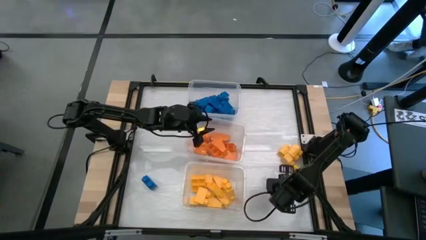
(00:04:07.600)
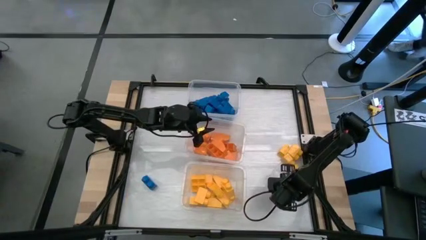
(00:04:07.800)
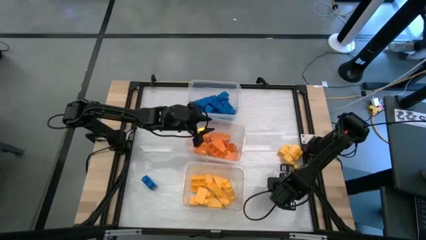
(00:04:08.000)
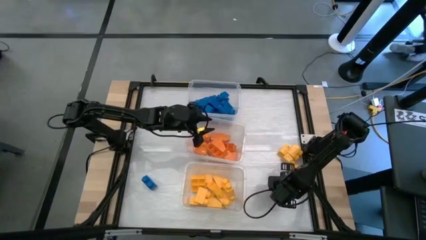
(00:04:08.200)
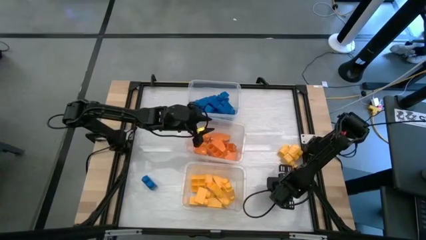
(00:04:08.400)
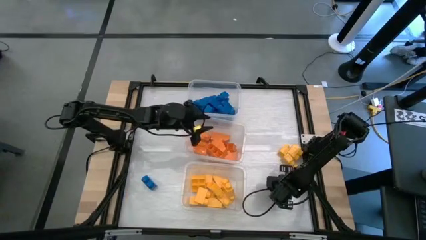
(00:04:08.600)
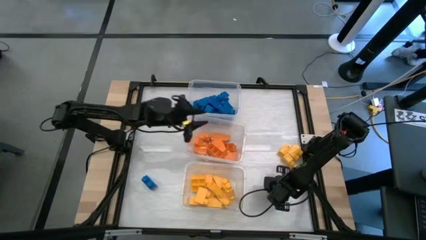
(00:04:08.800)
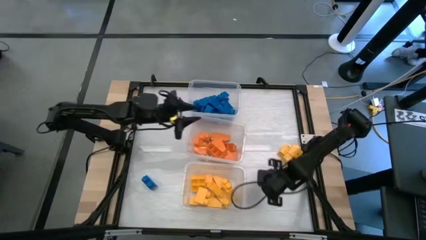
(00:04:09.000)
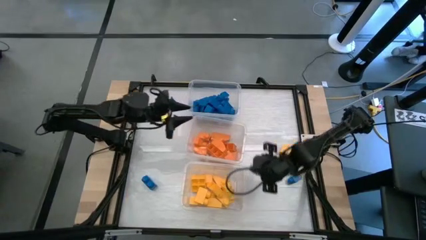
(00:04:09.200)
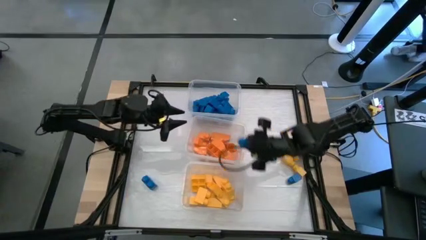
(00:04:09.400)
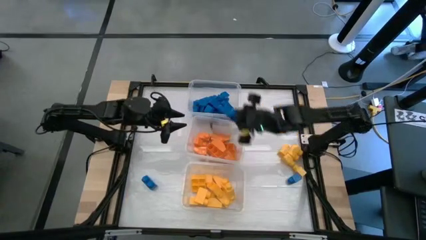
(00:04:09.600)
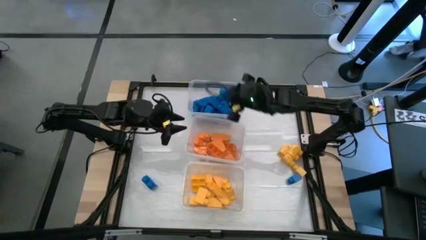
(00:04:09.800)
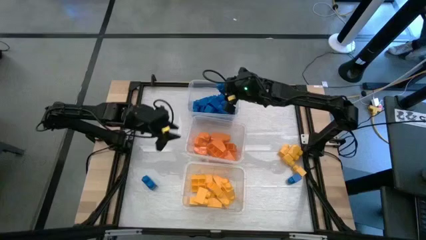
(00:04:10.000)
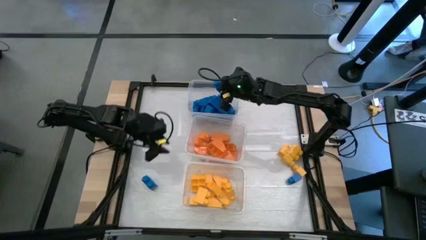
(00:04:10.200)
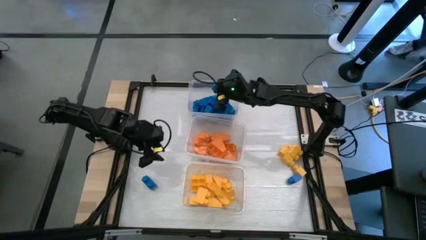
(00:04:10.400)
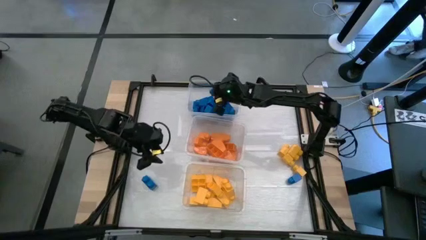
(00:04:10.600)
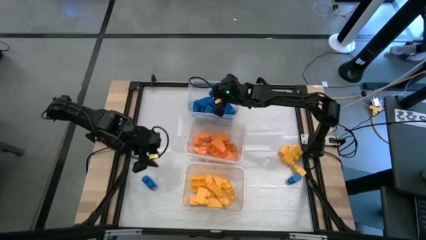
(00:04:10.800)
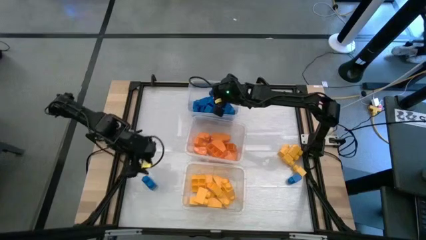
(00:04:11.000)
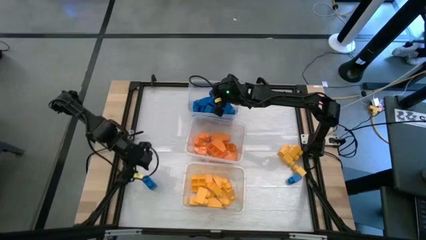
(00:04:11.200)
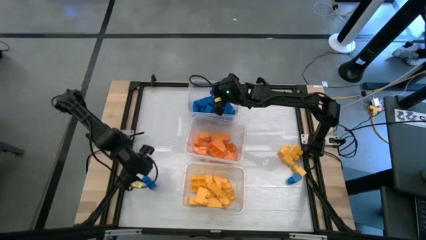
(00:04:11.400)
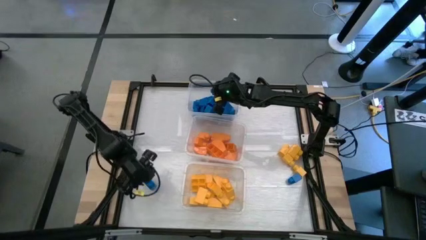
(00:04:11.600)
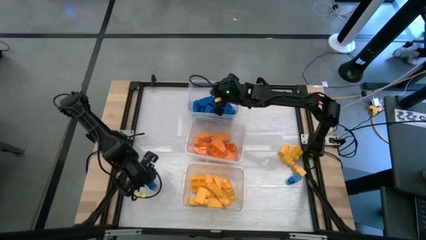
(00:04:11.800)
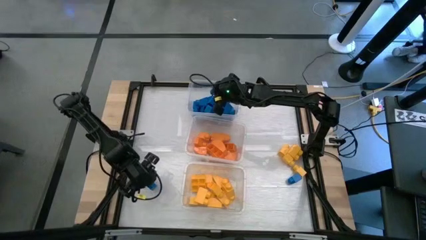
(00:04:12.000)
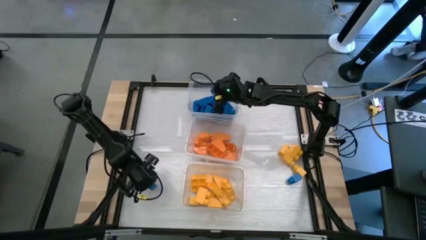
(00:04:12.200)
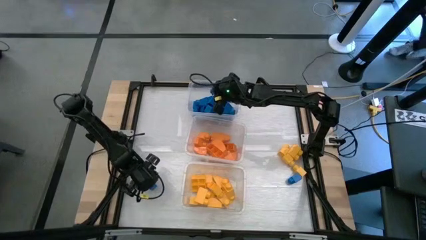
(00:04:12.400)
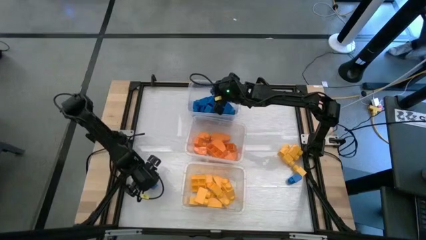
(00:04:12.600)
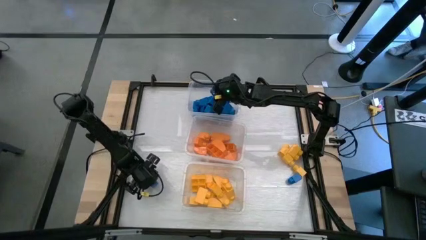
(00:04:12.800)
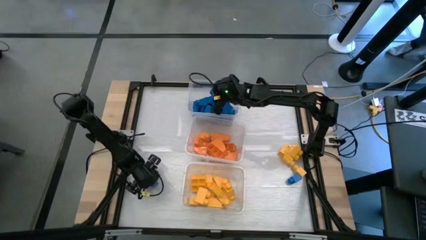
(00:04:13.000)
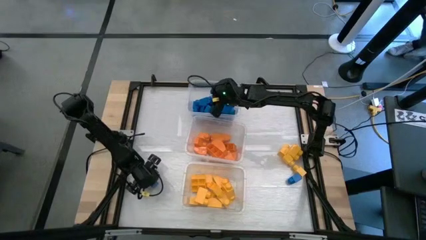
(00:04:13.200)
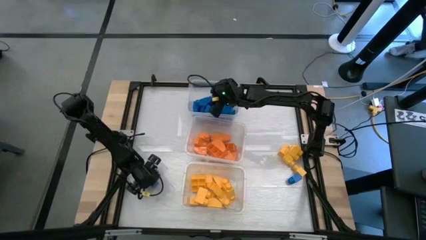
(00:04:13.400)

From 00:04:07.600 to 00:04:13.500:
Task: Sort blocks
Put the blue game piece into the top transparent bin

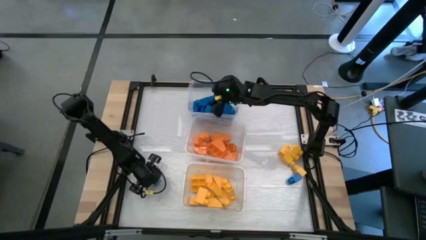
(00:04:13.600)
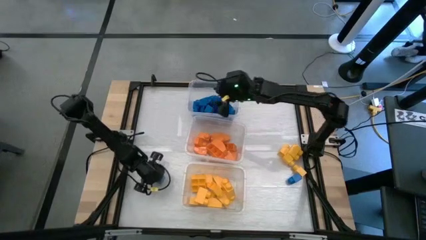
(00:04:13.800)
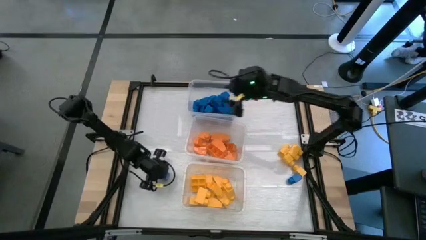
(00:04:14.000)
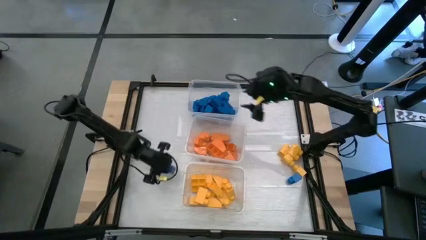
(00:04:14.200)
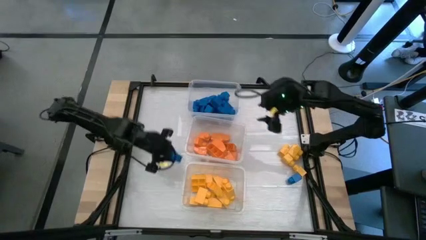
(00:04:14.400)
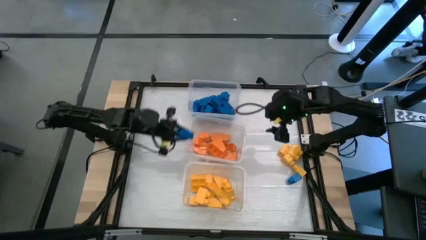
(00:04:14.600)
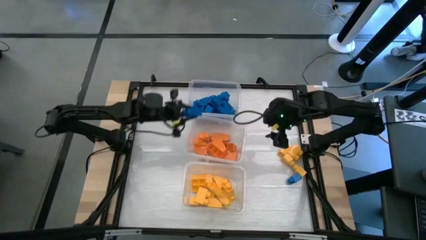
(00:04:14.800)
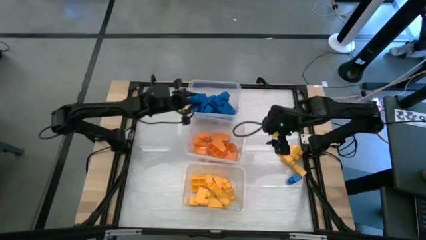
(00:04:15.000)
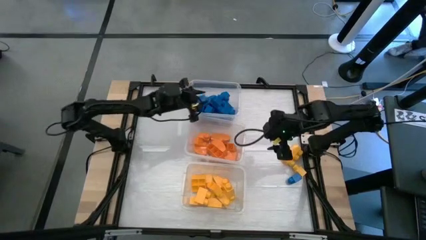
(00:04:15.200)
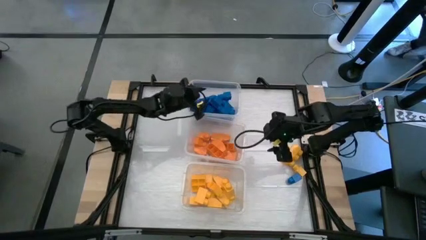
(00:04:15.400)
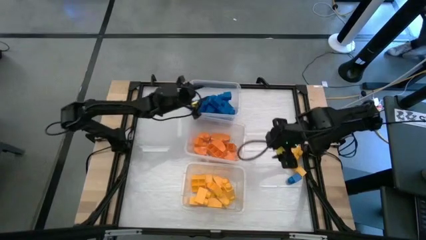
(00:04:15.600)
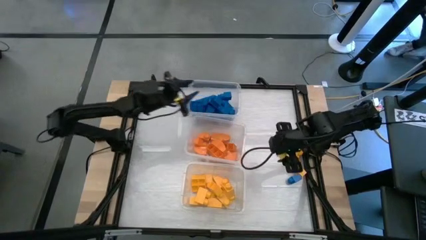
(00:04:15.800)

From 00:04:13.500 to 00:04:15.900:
Put the blue game piece into the top transparent bin

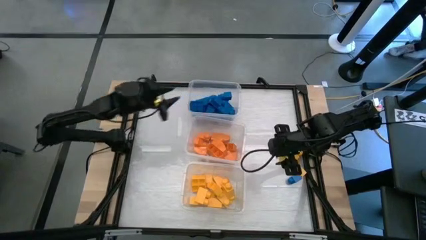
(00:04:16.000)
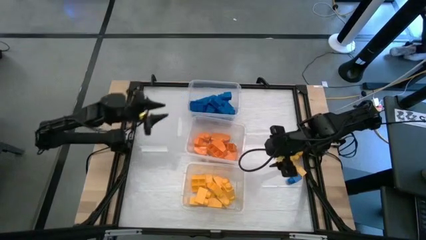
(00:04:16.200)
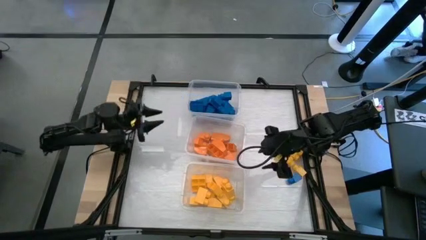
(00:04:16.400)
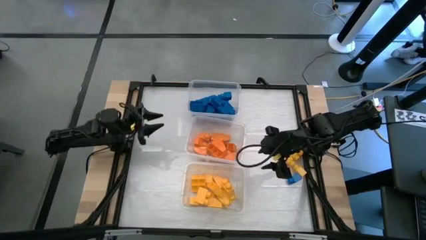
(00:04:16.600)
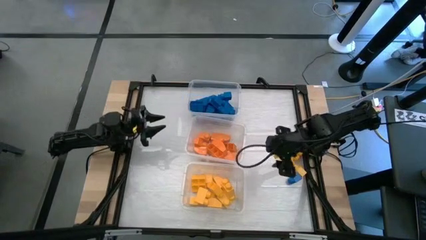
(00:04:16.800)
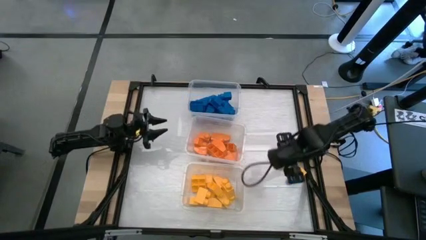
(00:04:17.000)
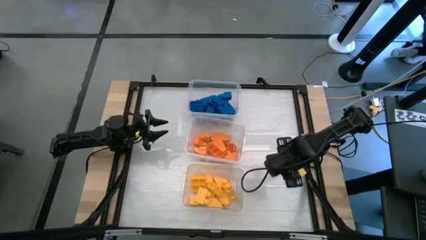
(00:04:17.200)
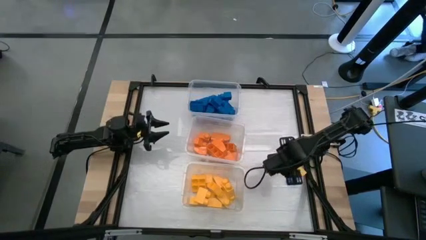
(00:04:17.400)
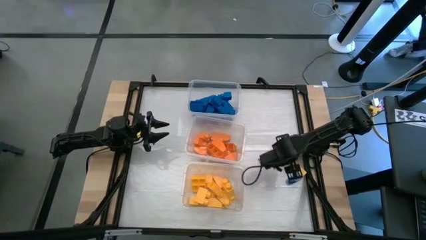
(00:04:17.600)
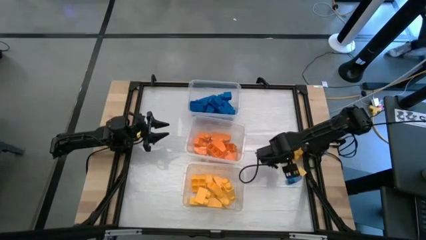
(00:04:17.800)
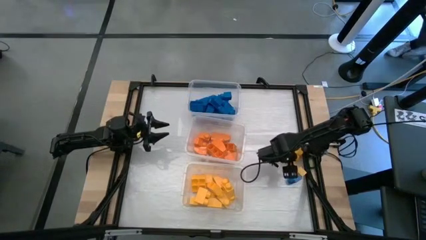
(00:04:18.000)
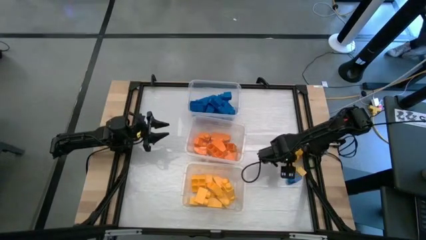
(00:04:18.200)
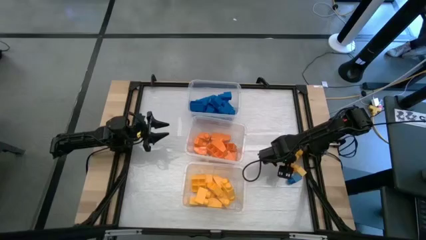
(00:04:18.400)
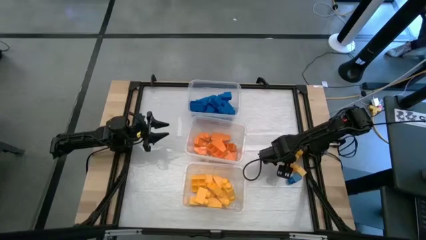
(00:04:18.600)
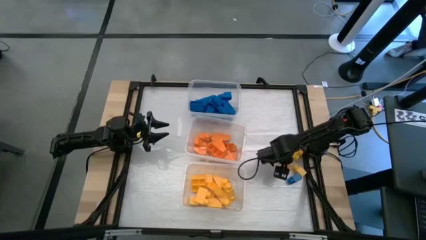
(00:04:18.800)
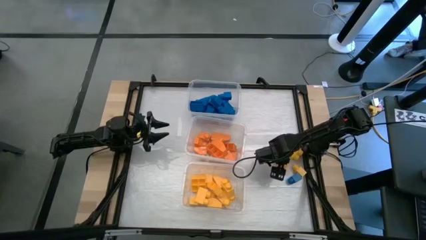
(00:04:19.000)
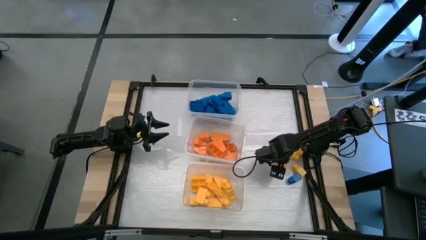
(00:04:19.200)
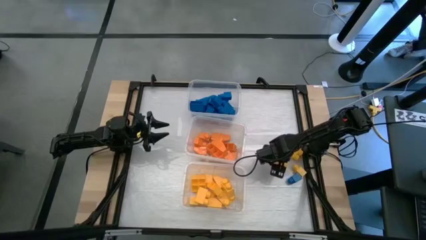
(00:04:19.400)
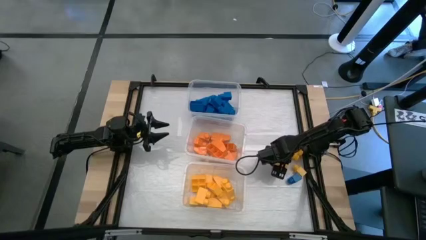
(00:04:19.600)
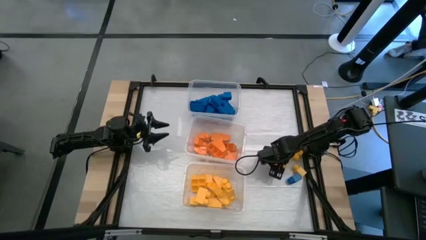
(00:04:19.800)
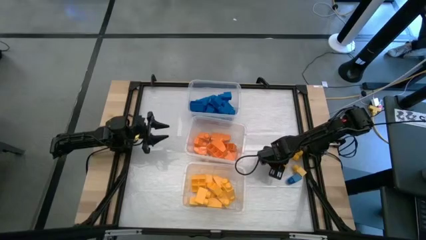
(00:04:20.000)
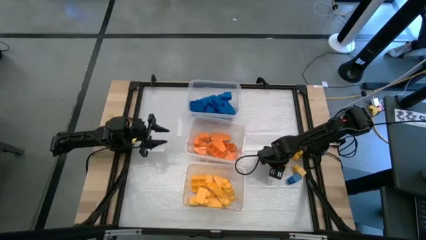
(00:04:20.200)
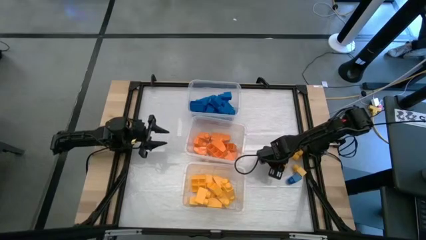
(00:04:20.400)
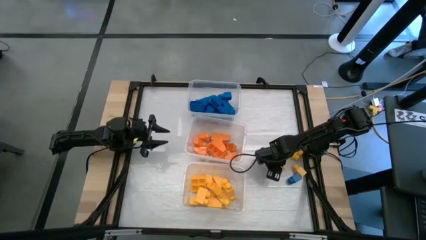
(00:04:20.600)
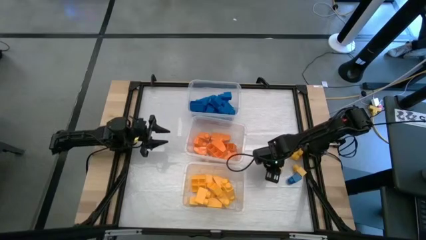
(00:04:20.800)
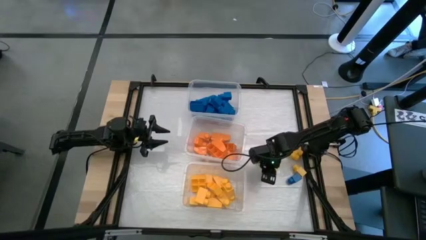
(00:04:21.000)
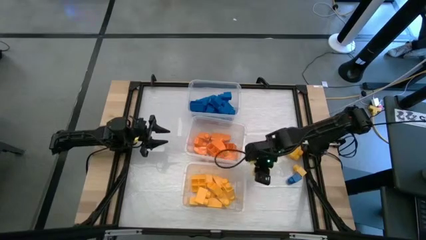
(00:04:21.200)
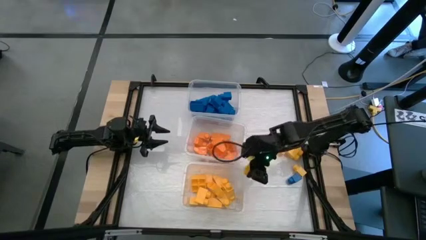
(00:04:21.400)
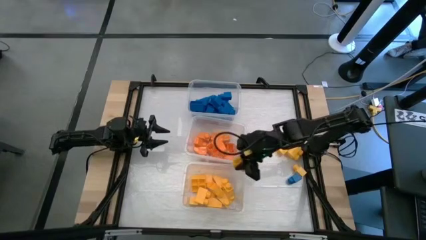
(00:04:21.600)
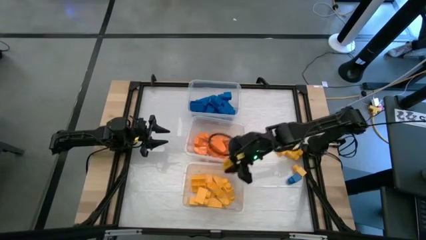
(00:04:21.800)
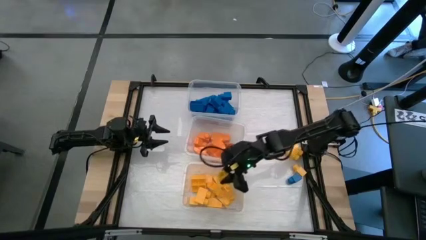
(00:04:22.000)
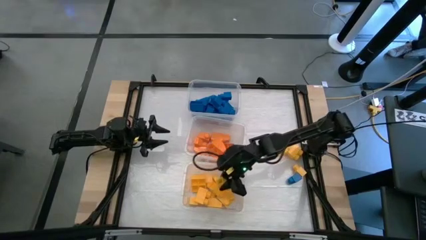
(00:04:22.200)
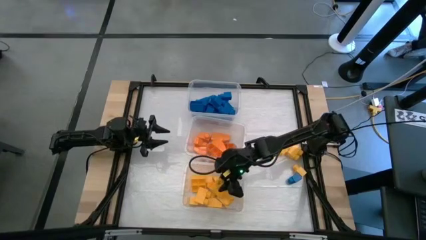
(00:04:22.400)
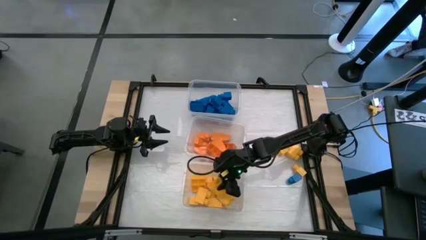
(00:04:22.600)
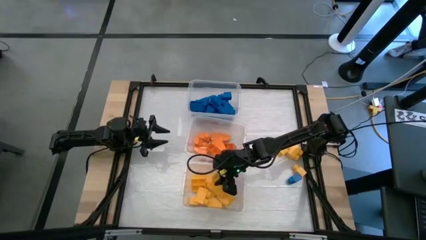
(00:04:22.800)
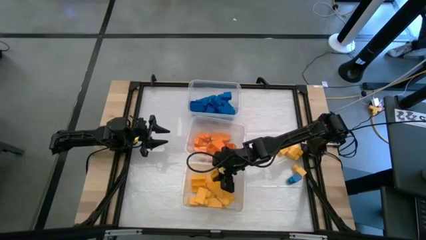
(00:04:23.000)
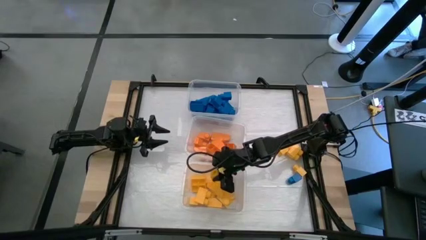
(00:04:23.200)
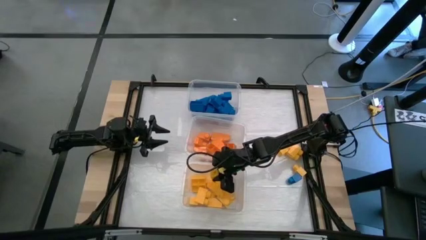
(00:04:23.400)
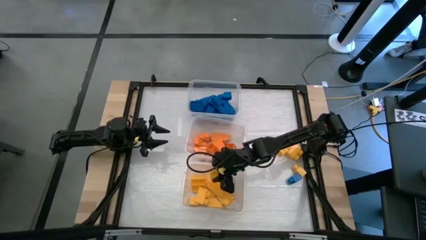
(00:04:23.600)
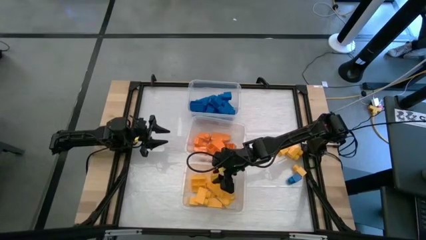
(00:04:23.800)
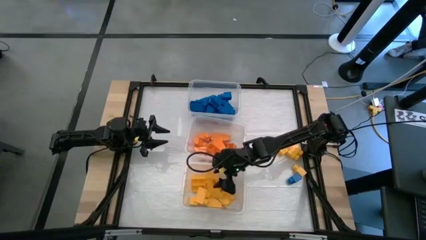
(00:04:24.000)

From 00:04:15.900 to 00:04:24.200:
Put the yellow game piece into the bottom transparent bin
